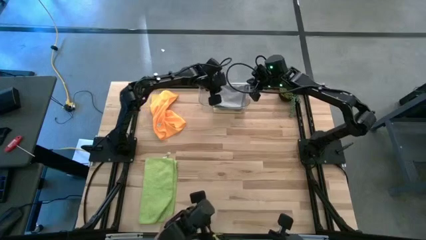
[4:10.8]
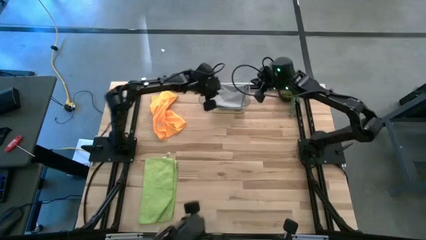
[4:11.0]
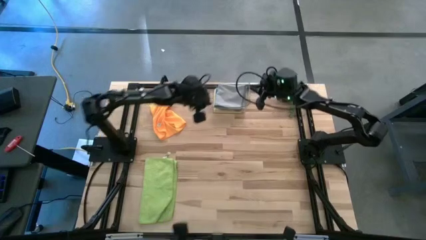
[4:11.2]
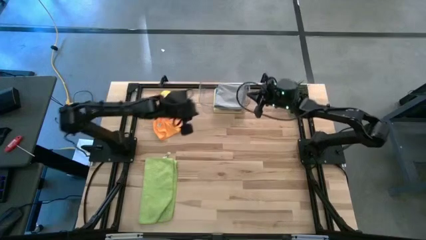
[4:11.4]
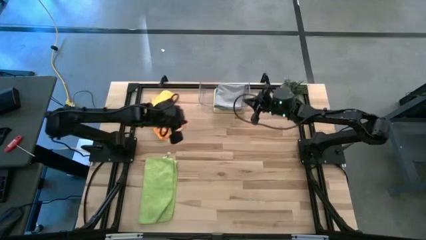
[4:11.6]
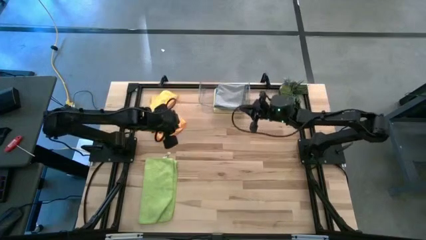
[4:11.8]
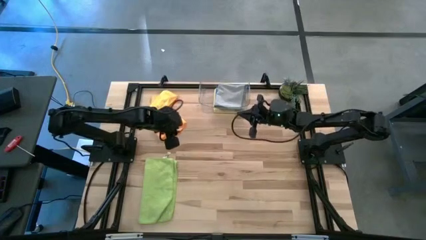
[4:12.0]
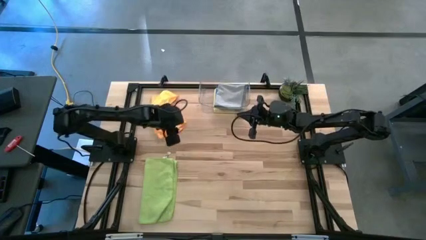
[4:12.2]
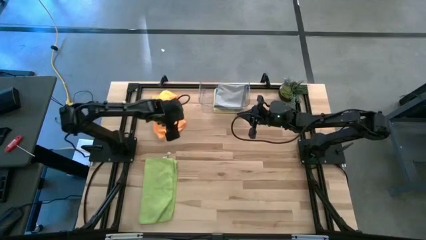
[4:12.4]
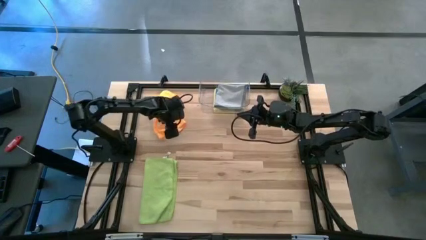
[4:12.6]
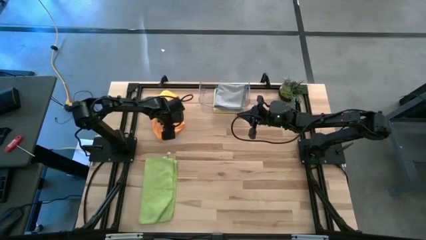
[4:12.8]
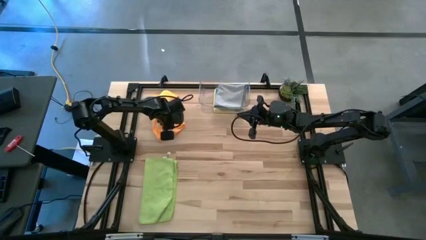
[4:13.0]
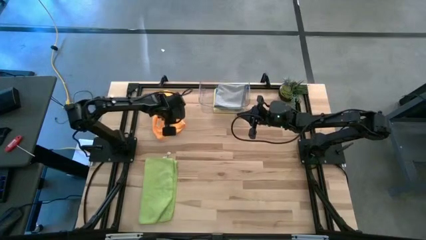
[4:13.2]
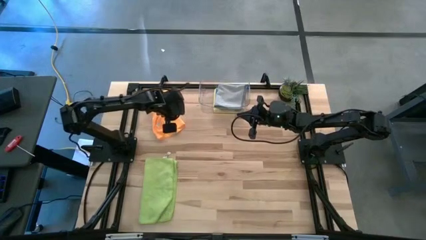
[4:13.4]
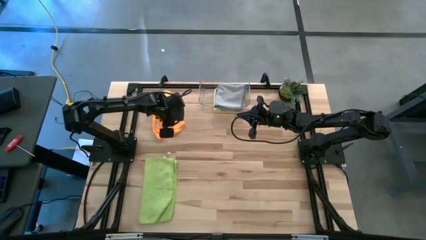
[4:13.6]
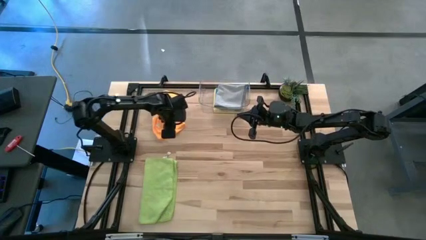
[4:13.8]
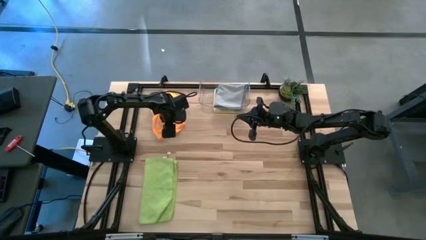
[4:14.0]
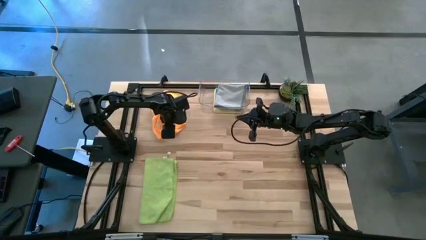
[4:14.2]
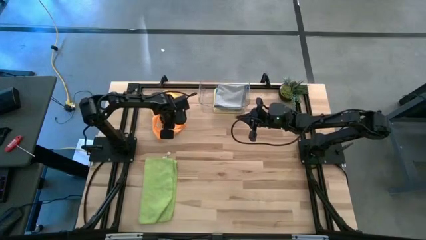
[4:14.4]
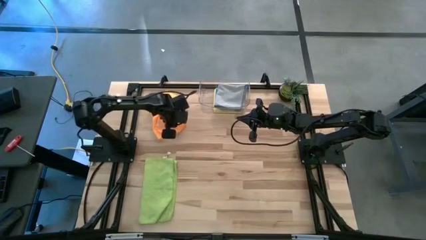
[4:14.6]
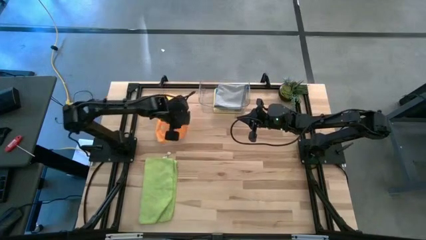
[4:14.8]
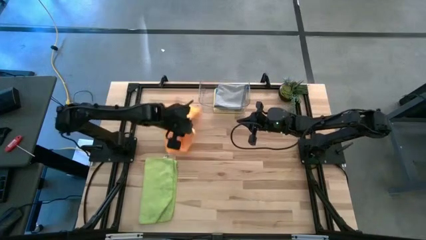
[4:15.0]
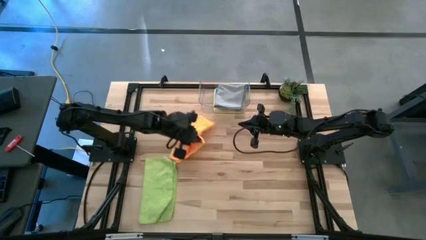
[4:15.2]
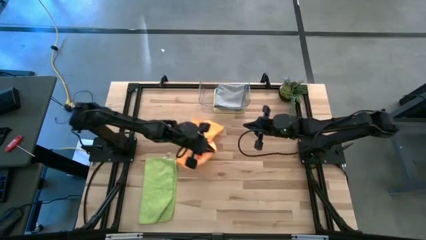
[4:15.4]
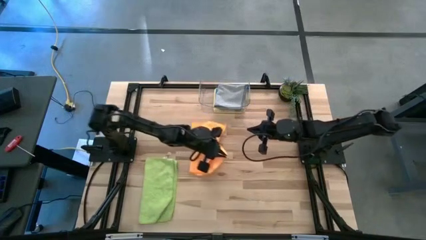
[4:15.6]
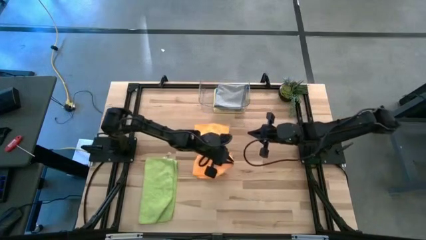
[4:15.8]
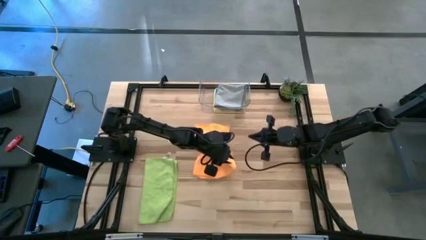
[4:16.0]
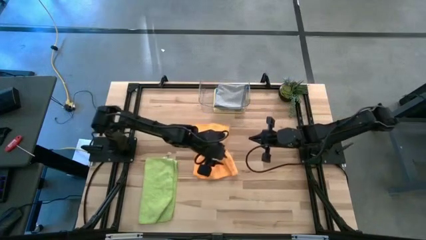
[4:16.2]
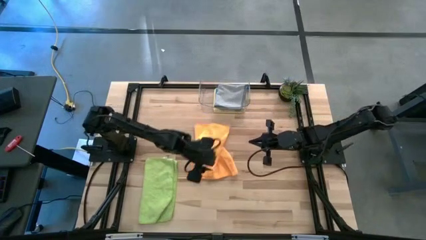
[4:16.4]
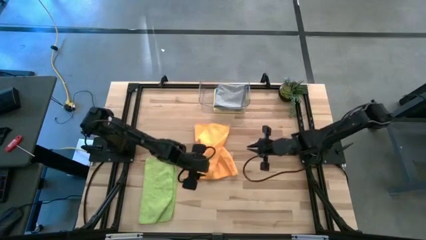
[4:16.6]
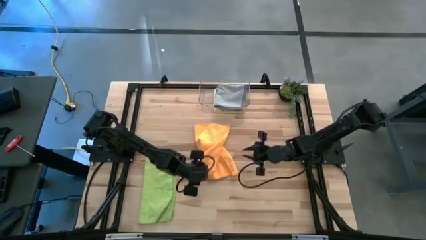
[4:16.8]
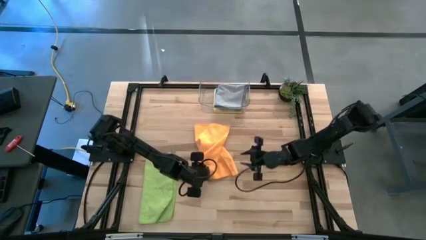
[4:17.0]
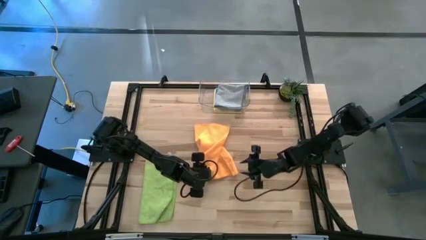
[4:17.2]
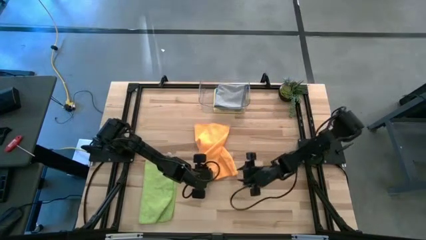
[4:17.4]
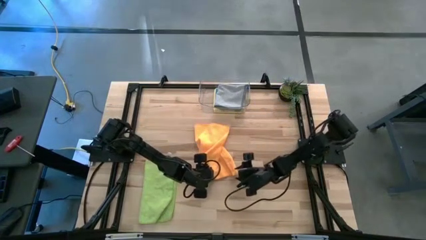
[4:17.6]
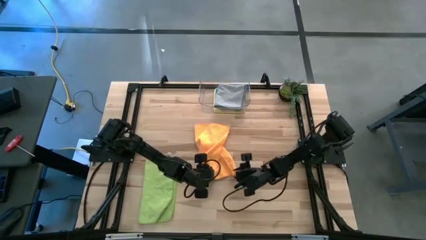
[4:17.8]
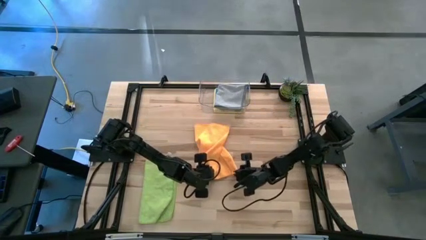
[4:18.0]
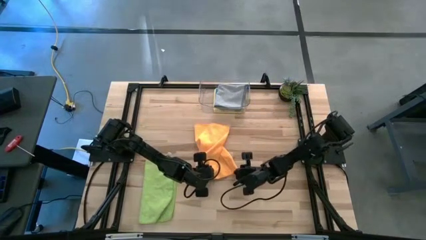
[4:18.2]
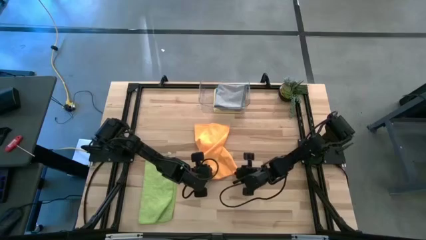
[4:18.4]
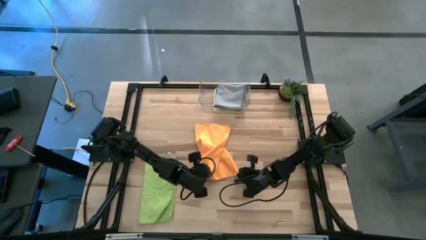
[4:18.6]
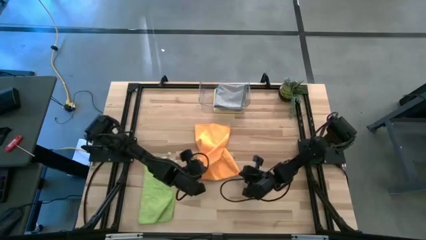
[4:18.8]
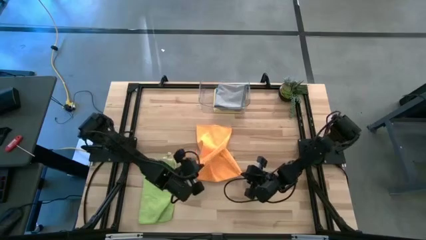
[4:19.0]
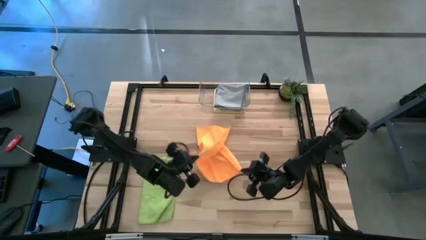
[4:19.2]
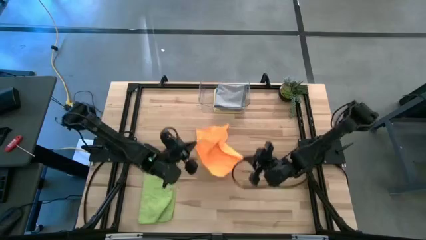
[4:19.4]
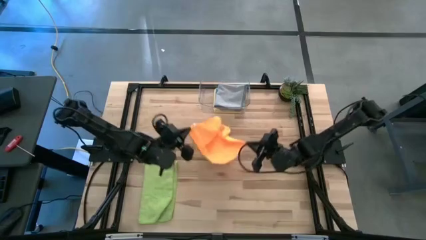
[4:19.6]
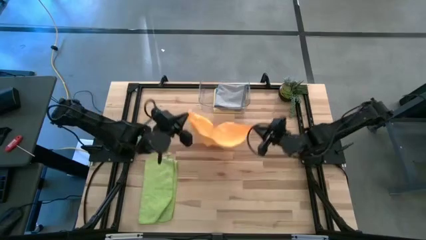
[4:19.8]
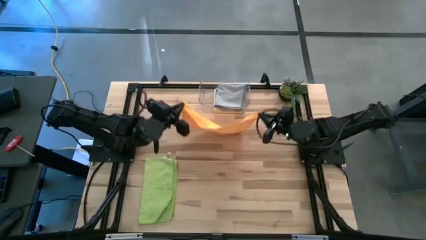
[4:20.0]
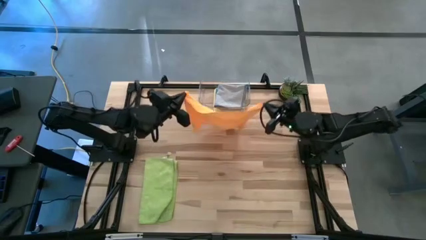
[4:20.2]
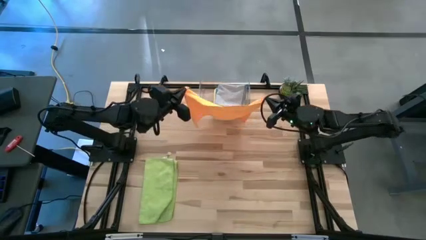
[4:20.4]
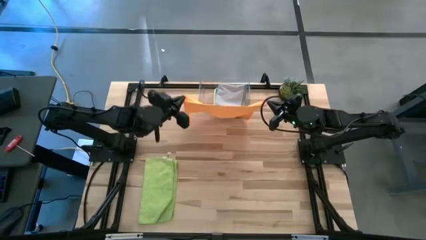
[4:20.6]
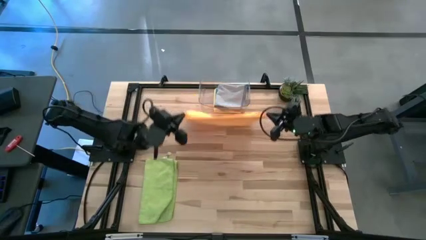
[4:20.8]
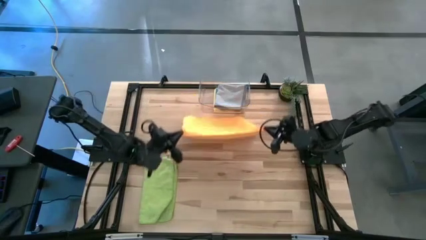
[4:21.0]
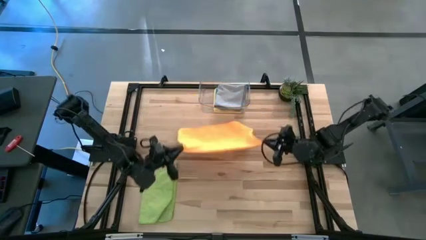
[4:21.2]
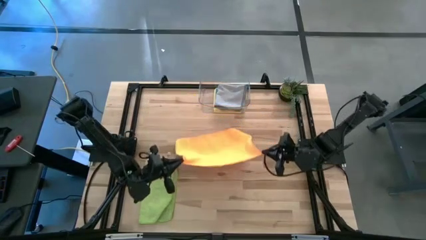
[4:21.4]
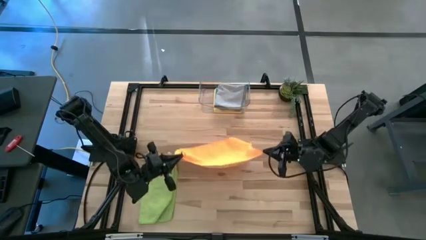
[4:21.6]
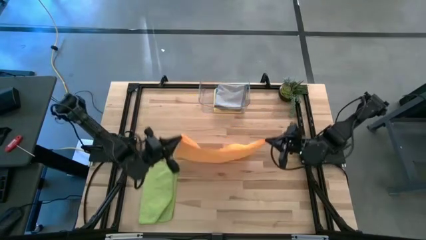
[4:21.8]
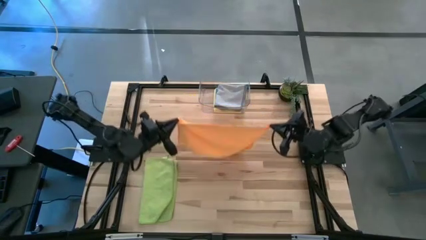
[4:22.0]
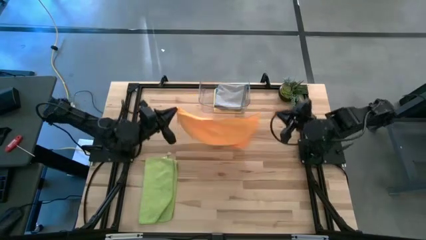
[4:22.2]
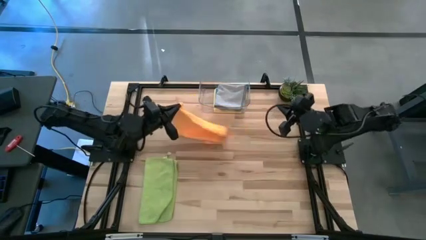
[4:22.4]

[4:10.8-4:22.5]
Task: Fold microfiber towels
Fold the orange towel on the table
